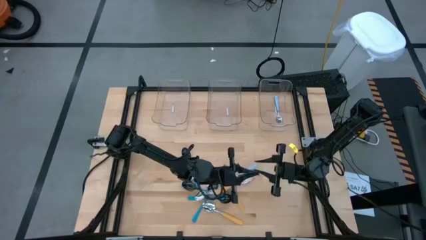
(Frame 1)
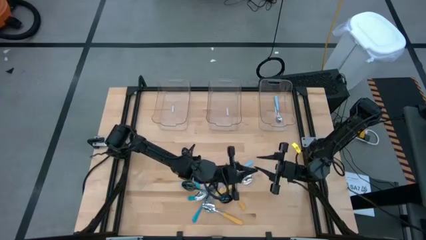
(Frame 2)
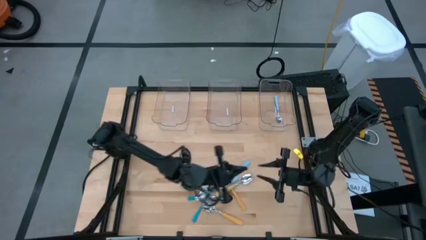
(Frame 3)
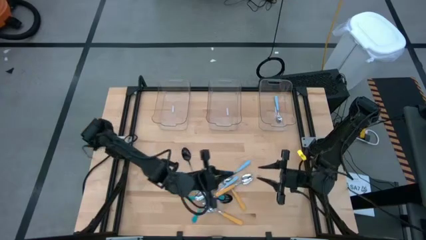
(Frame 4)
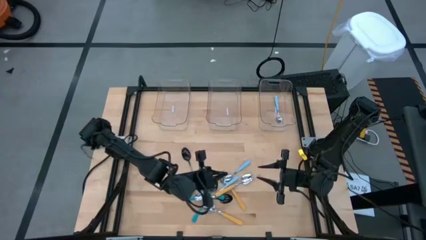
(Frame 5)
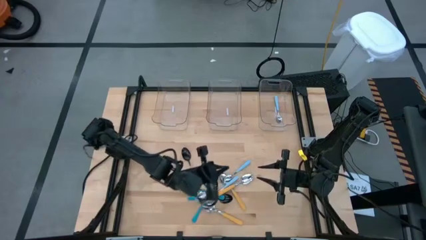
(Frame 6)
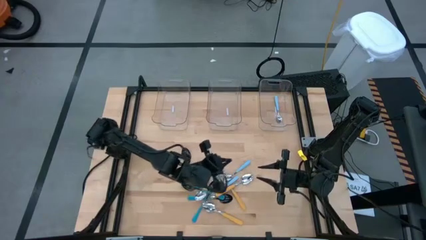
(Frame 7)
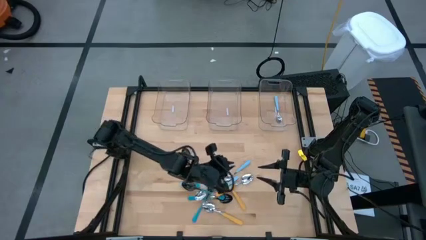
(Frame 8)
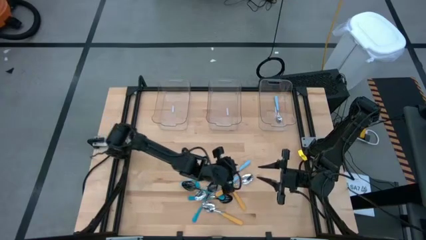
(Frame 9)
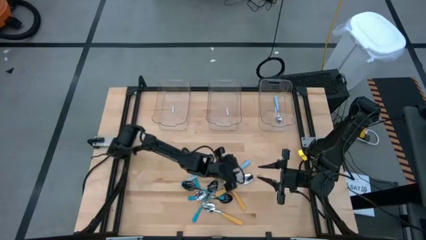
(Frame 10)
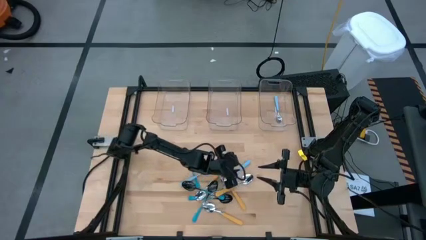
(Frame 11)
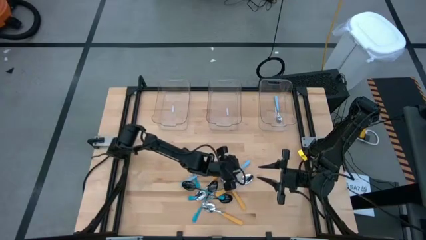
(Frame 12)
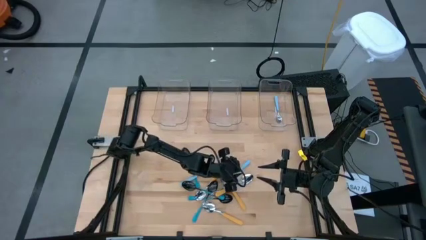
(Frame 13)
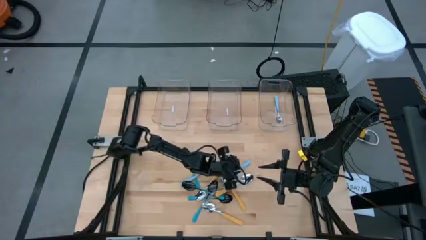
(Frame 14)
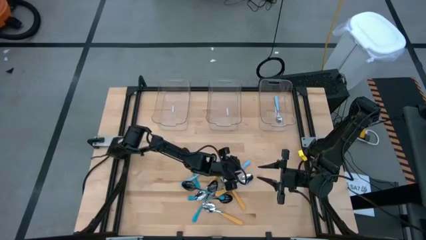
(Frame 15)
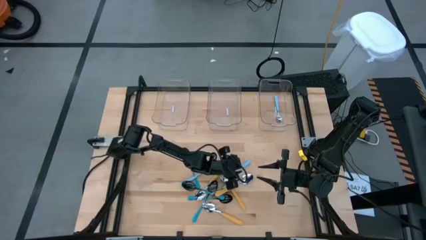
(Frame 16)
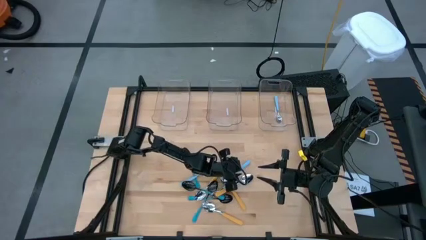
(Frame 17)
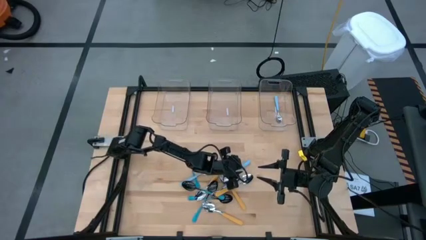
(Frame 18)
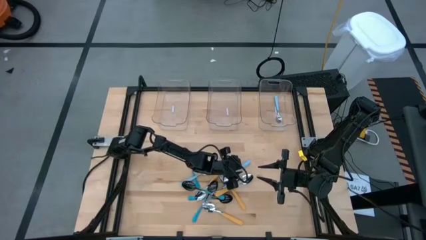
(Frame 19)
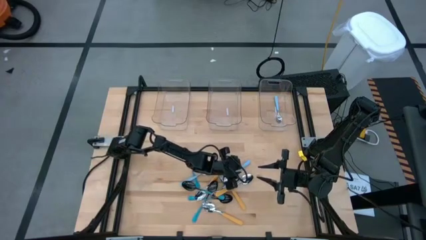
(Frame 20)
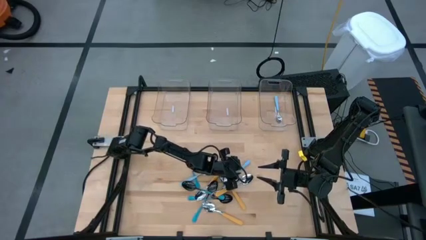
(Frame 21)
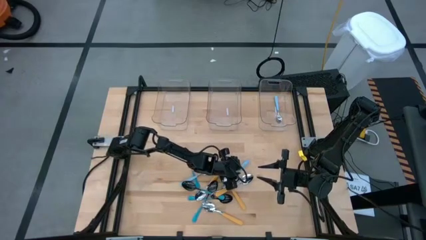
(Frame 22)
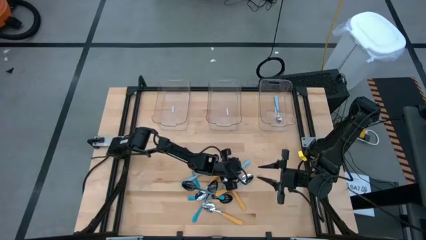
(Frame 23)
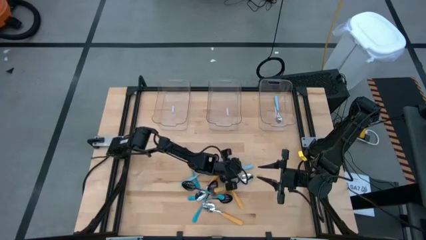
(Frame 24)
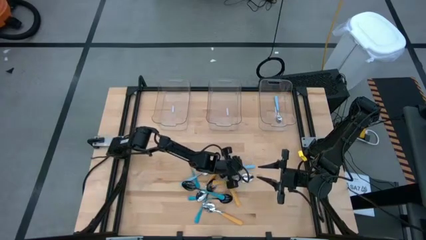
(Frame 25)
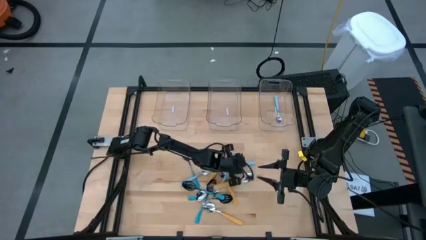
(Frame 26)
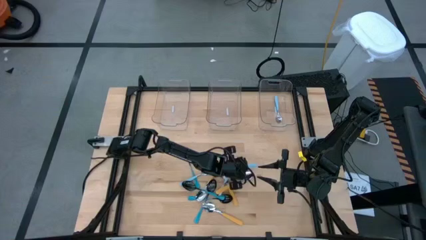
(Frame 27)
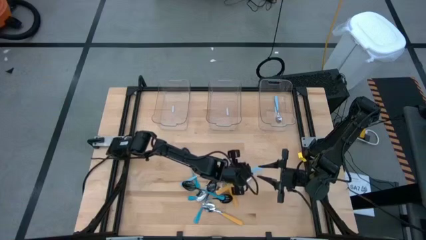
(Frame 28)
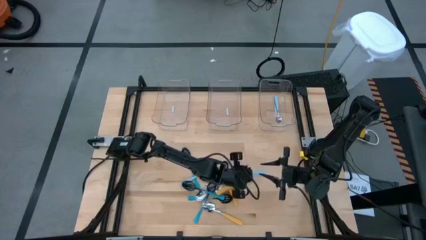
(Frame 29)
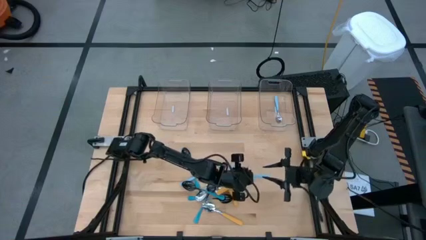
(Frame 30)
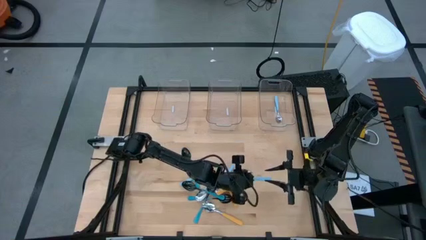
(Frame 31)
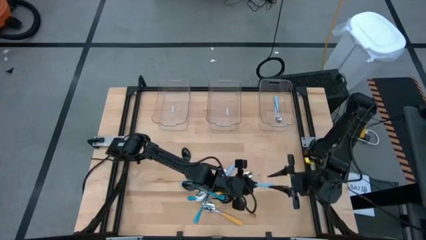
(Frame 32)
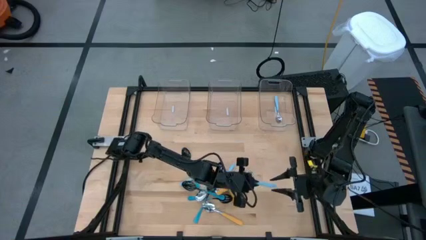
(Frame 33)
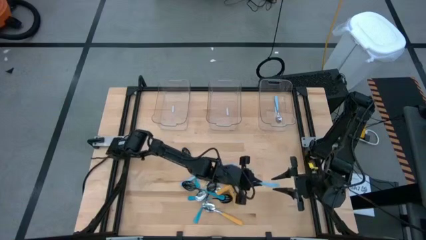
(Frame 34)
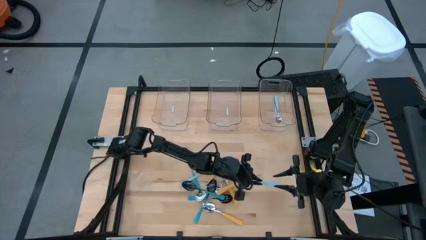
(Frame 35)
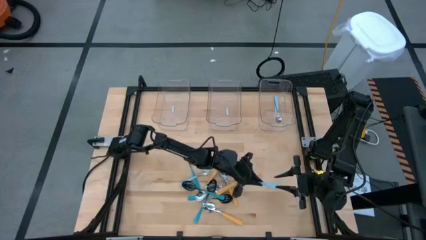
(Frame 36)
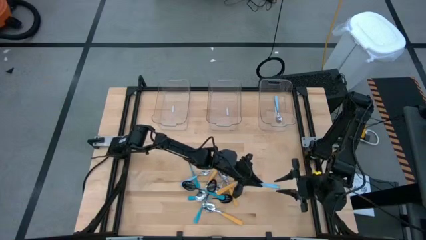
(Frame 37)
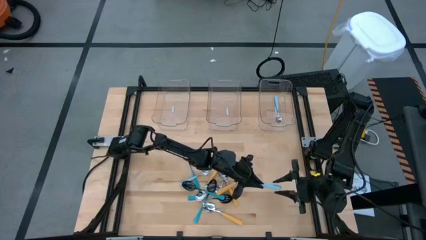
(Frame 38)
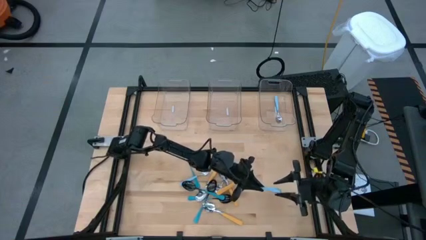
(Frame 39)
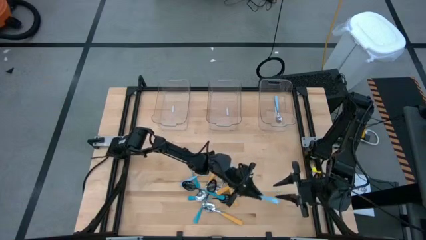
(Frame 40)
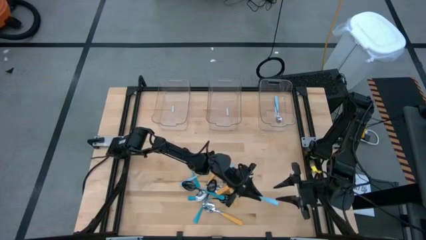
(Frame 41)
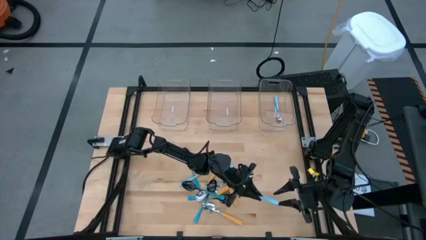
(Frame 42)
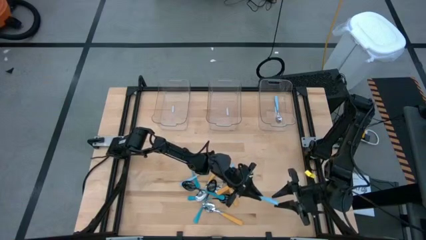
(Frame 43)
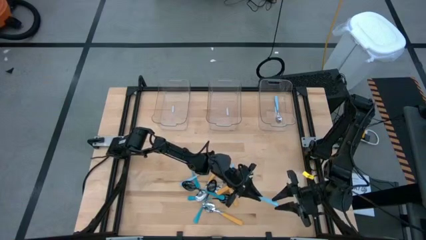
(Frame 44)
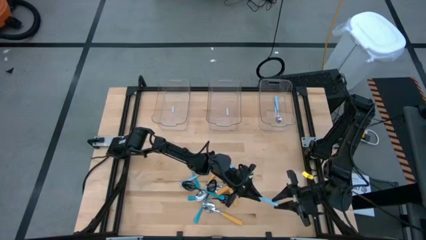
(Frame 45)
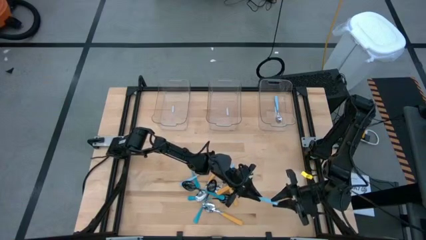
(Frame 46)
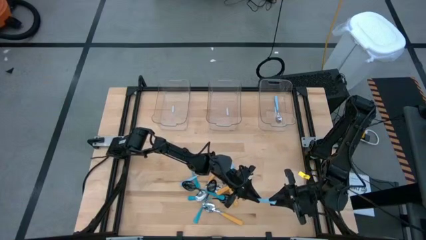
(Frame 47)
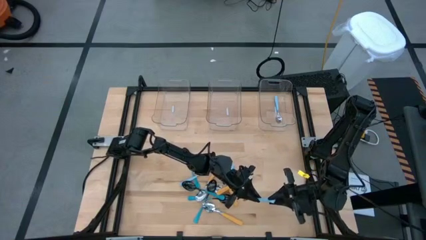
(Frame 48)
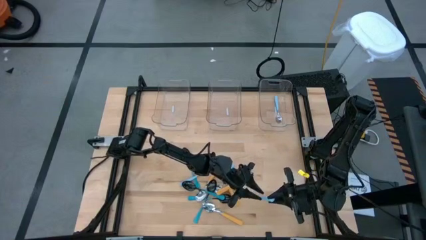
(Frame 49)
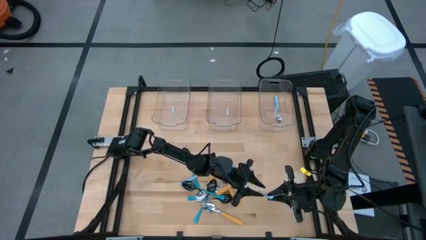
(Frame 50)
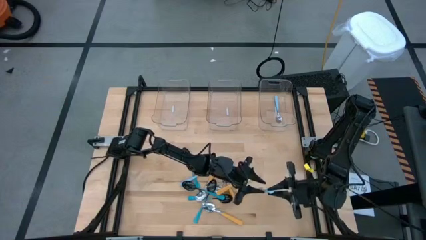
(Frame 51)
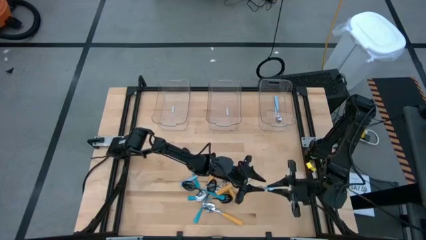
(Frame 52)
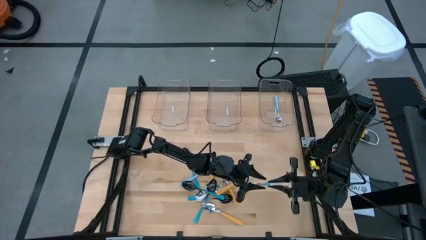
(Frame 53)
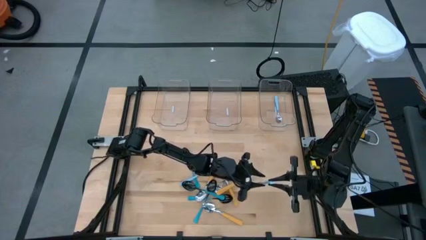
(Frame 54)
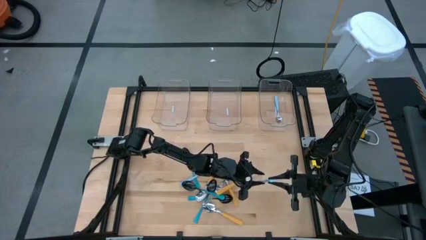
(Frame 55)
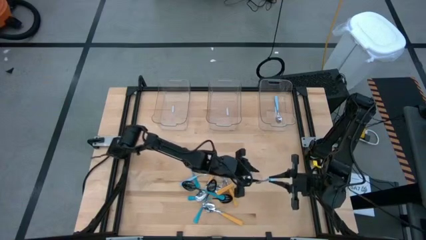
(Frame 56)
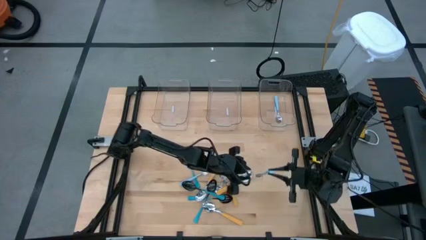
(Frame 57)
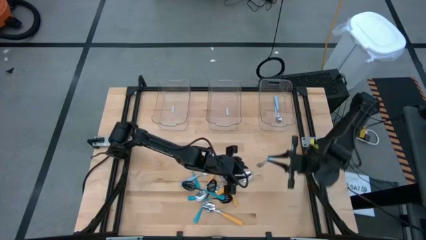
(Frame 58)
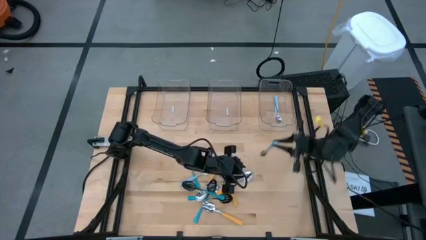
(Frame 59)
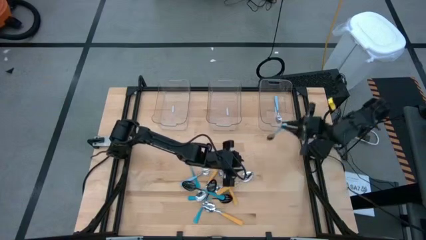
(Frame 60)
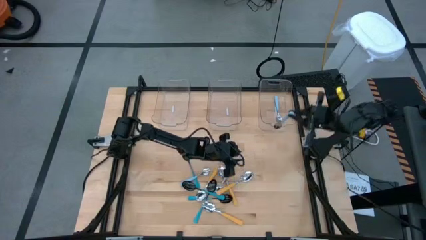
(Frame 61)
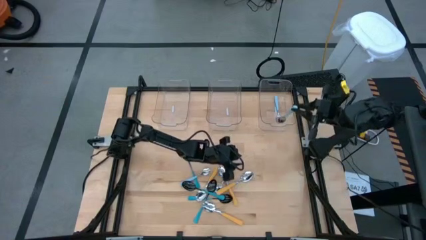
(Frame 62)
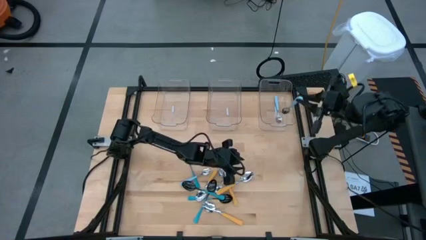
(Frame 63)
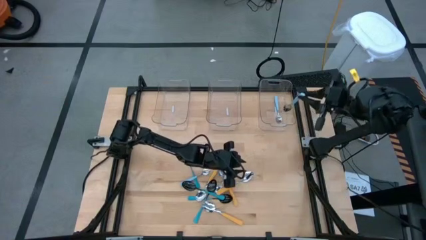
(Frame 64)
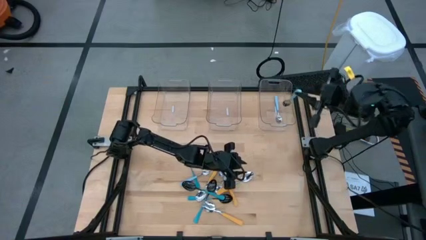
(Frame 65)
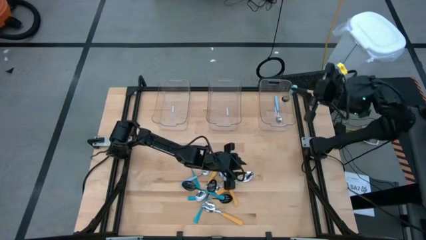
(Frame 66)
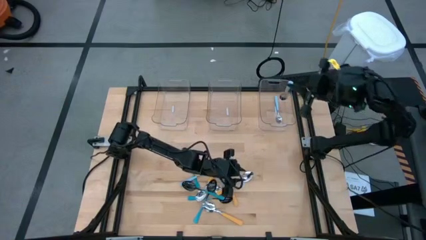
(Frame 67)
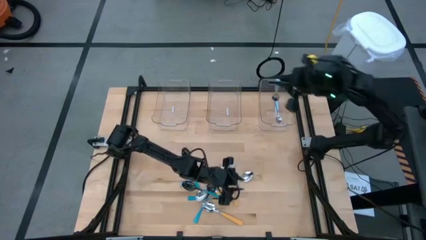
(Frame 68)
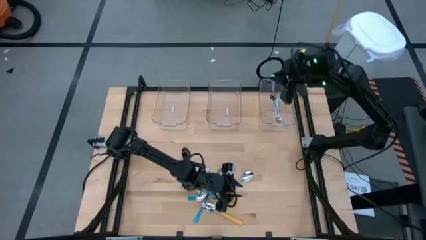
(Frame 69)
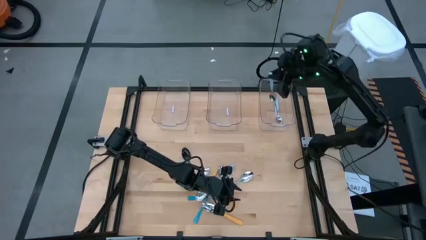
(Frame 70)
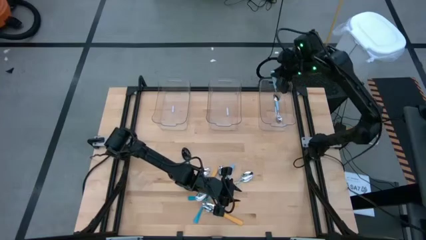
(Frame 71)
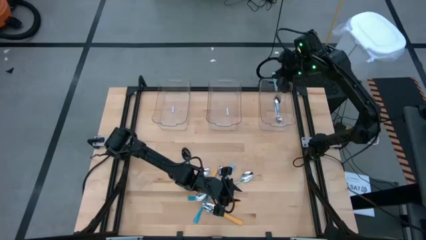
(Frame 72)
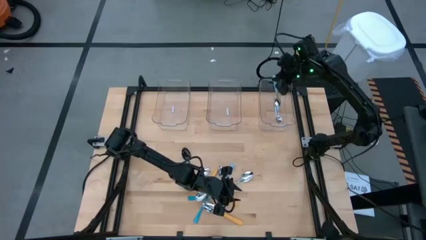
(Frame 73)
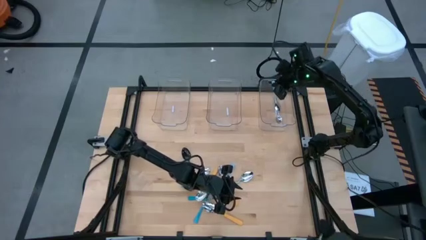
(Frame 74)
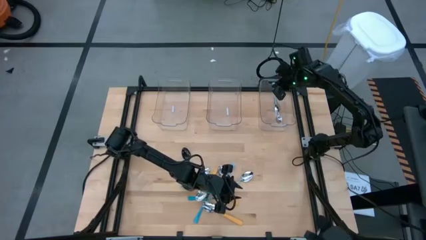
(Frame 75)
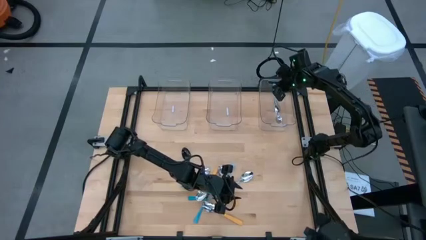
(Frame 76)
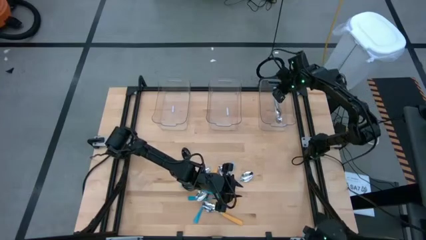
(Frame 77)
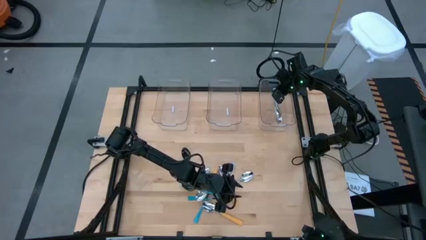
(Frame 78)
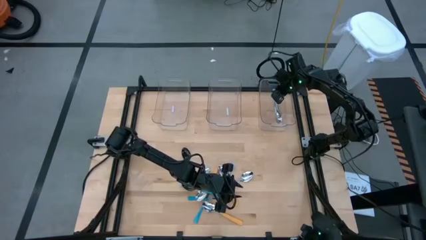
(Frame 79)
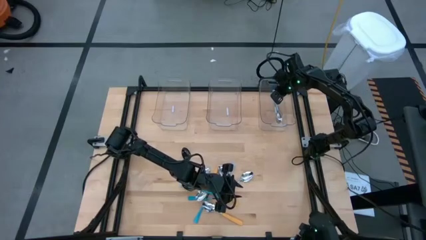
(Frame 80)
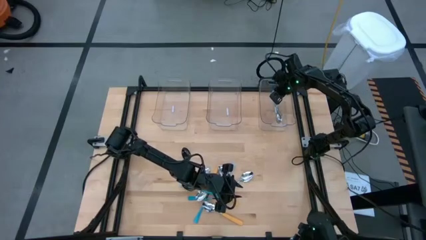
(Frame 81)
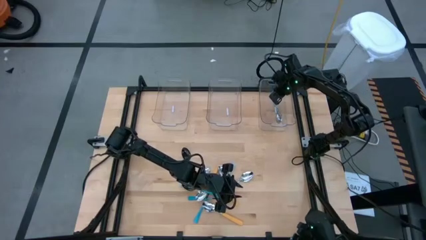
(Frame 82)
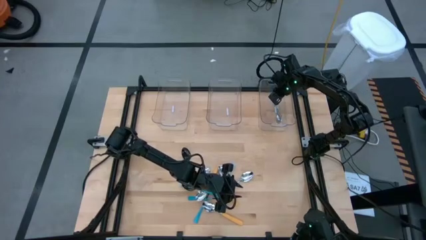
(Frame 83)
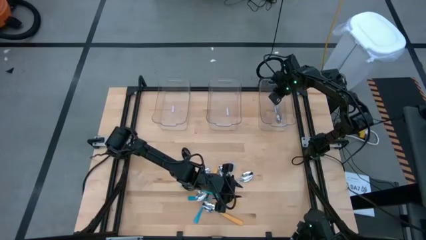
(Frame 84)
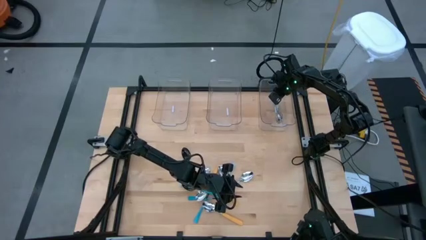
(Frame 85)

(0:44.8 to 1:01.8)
Task: Sort silverware by color (type)
Put the light blue spoon into the right transparent bin
